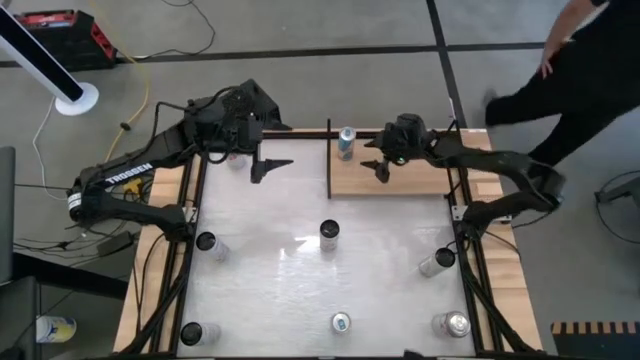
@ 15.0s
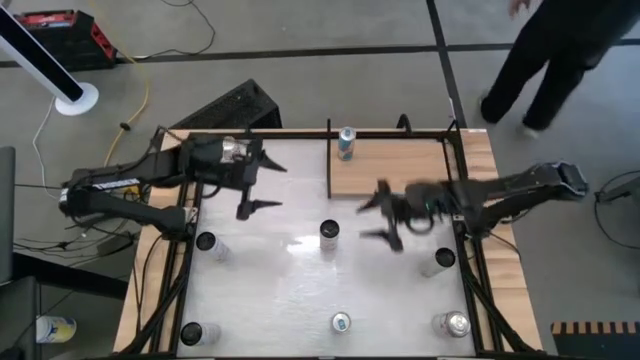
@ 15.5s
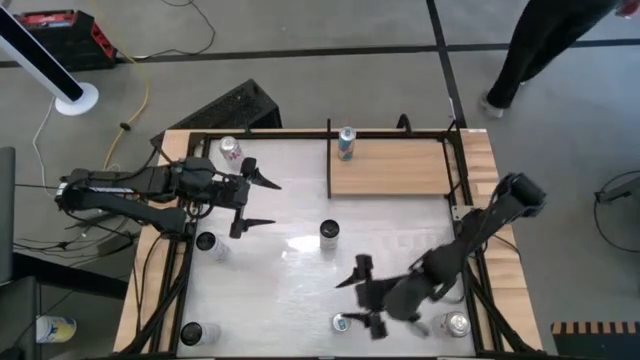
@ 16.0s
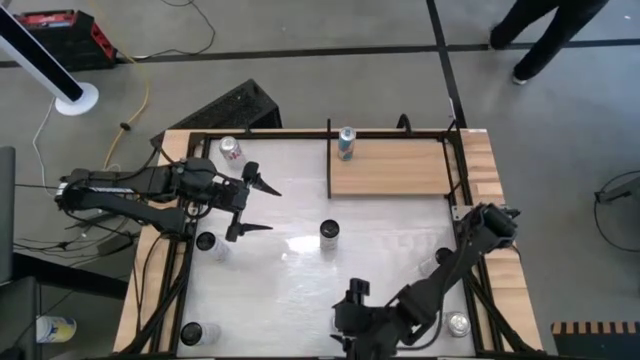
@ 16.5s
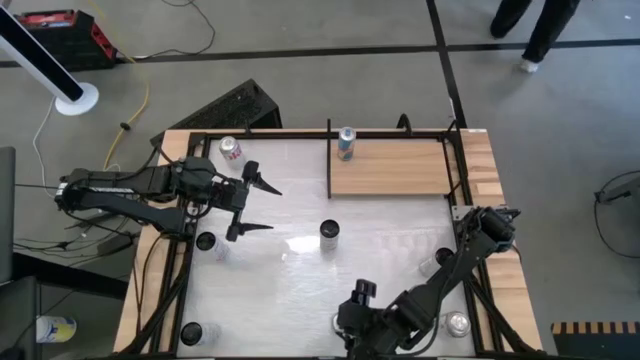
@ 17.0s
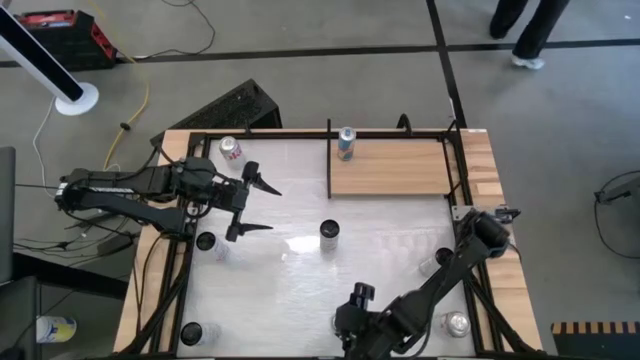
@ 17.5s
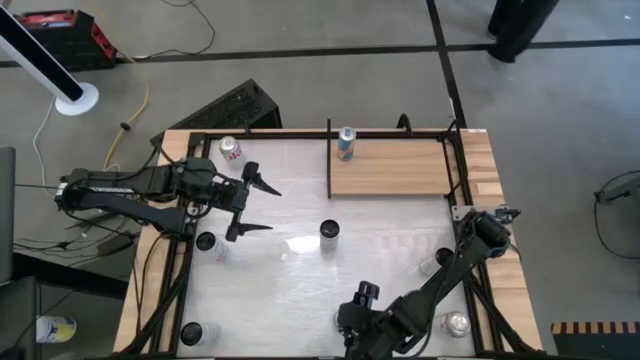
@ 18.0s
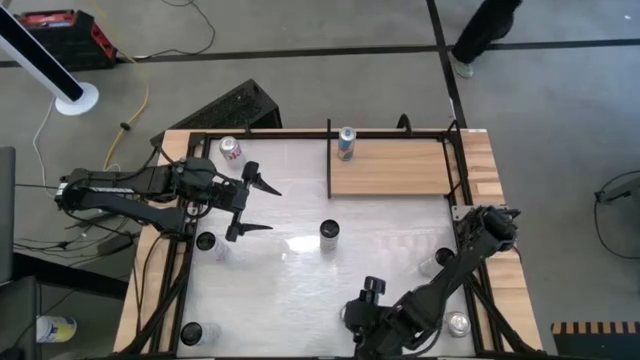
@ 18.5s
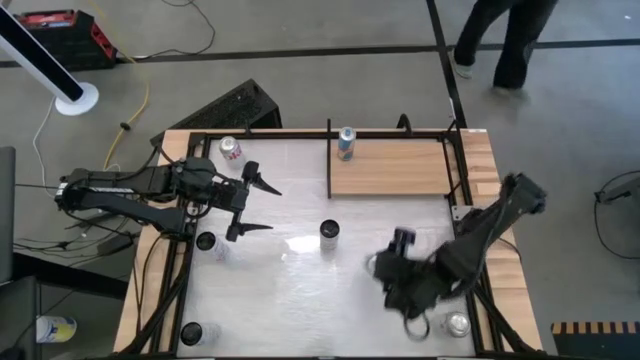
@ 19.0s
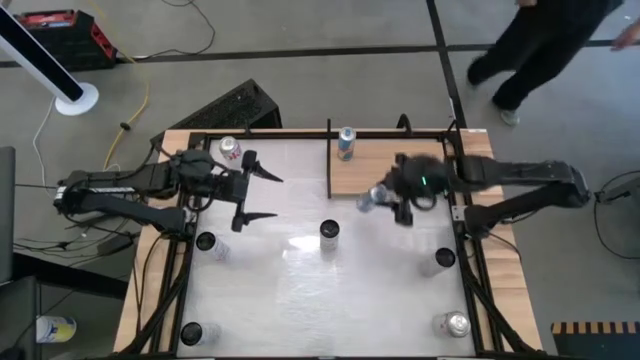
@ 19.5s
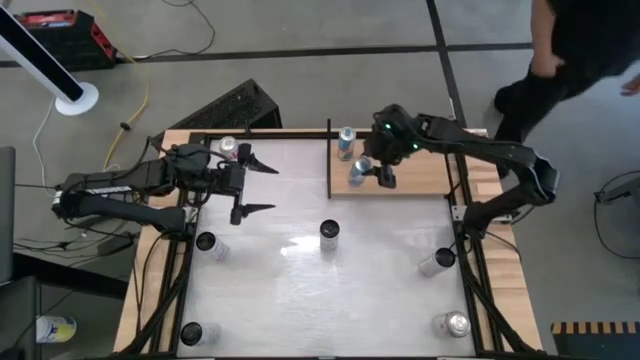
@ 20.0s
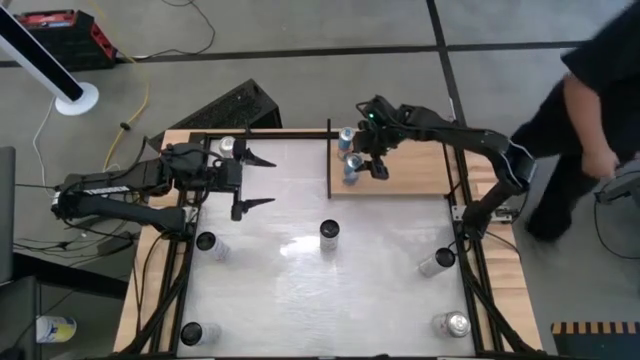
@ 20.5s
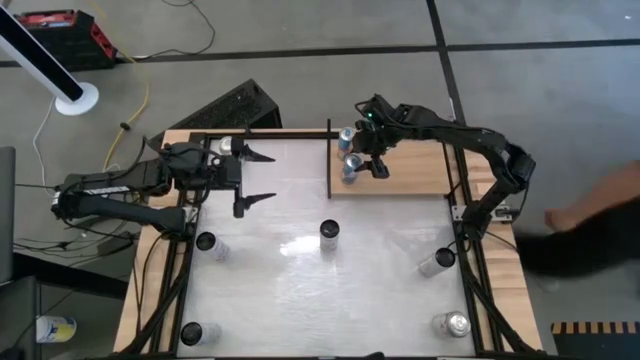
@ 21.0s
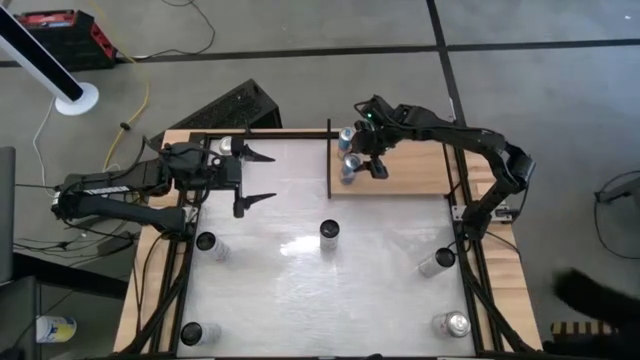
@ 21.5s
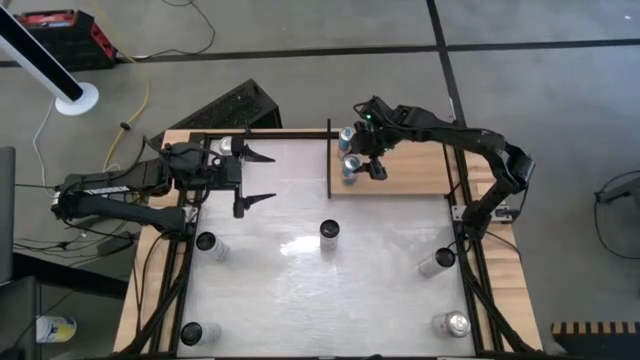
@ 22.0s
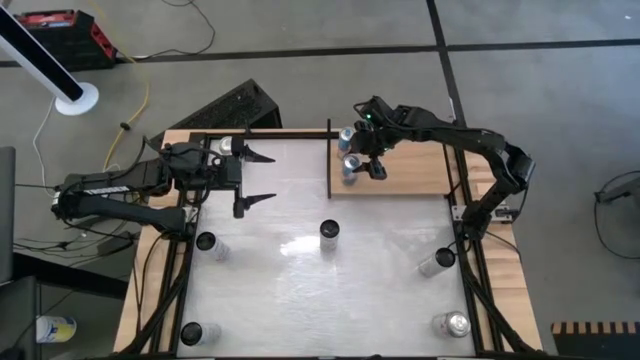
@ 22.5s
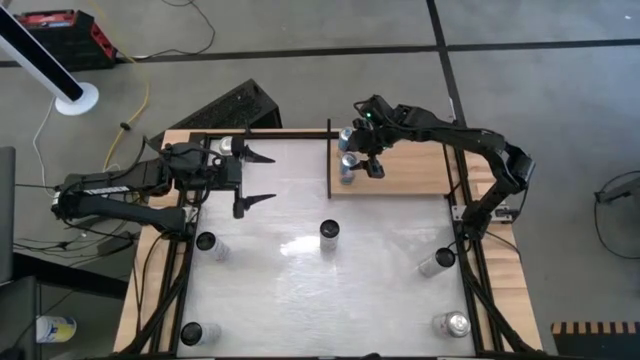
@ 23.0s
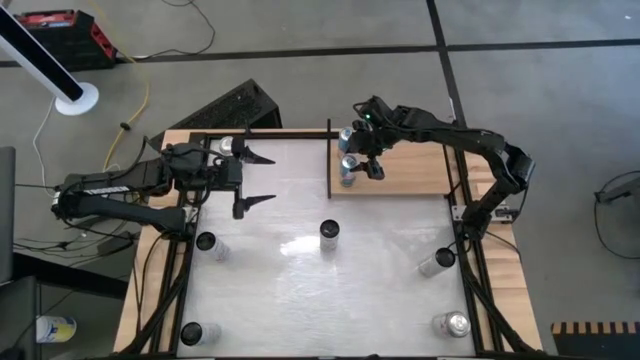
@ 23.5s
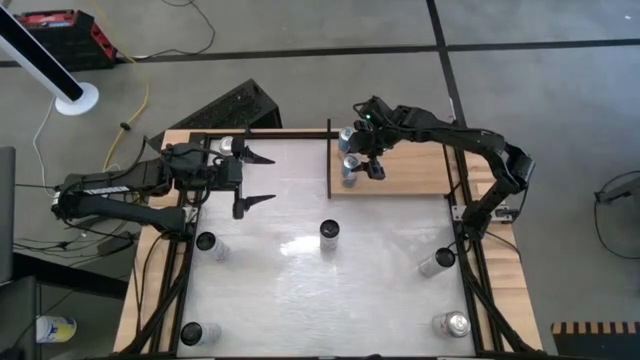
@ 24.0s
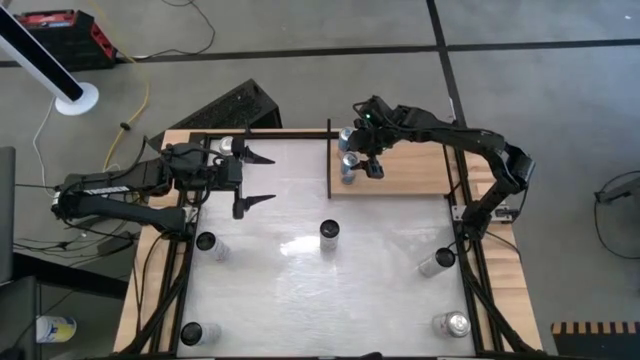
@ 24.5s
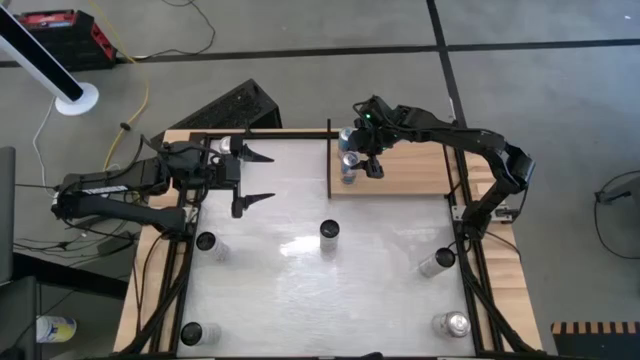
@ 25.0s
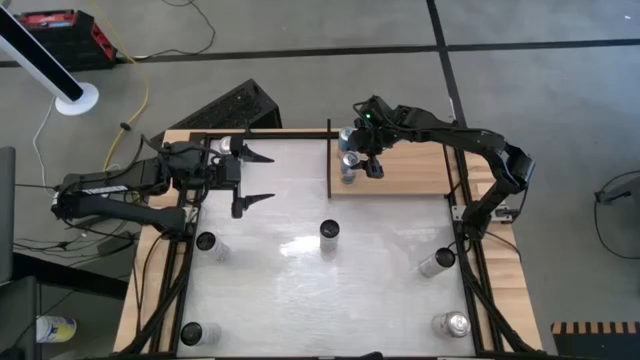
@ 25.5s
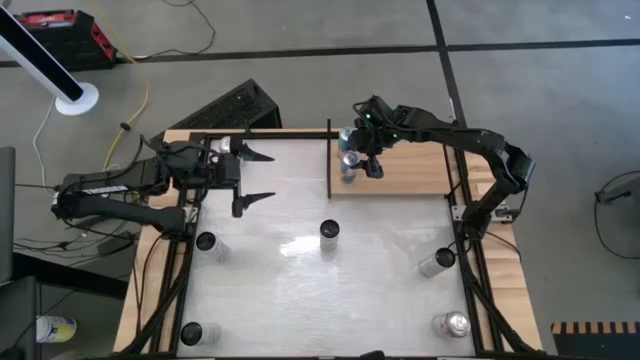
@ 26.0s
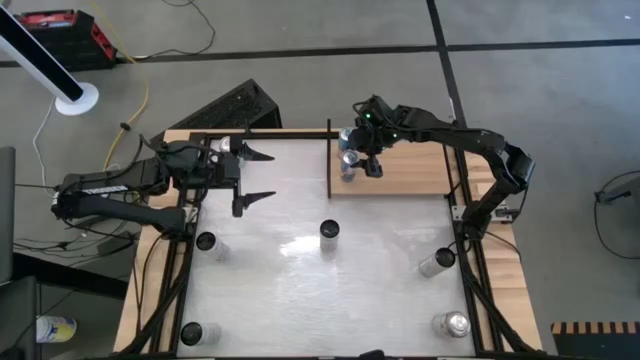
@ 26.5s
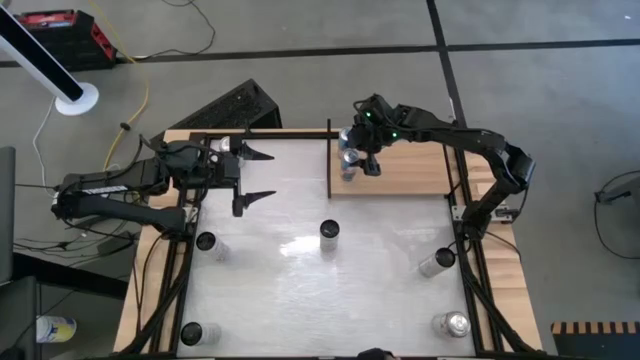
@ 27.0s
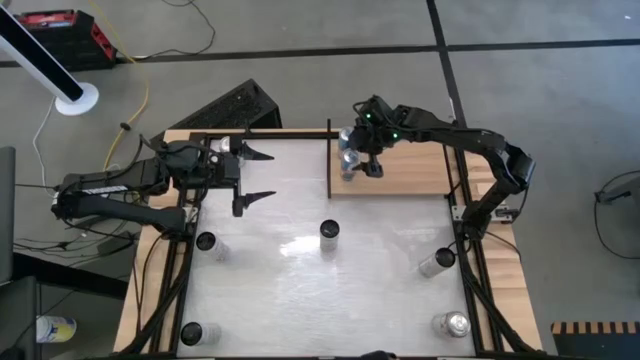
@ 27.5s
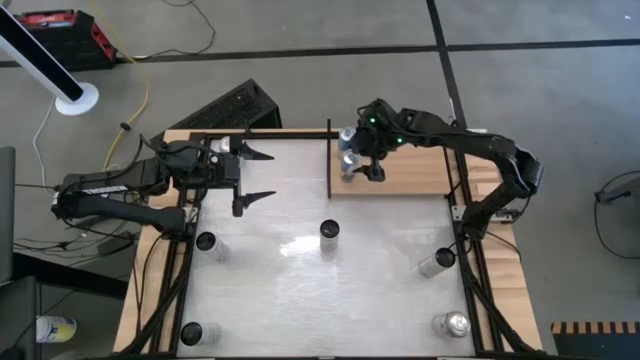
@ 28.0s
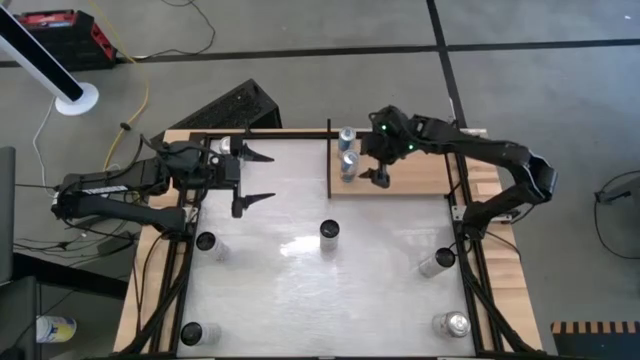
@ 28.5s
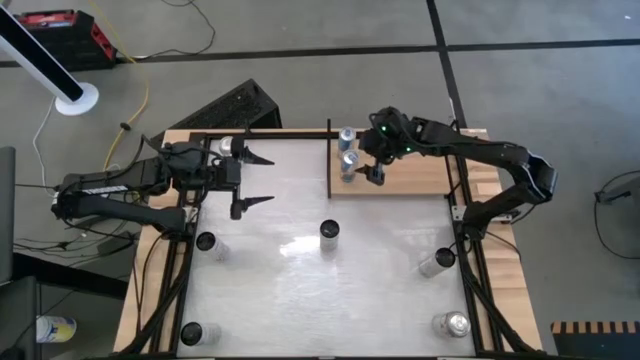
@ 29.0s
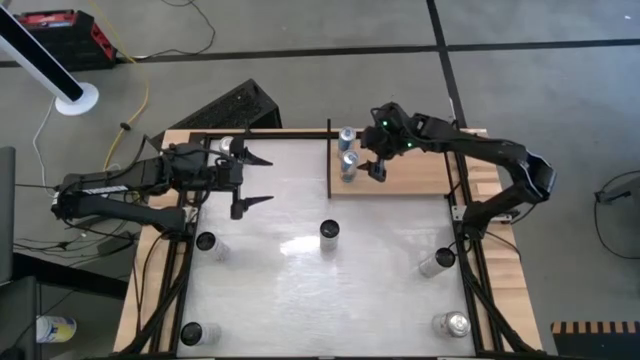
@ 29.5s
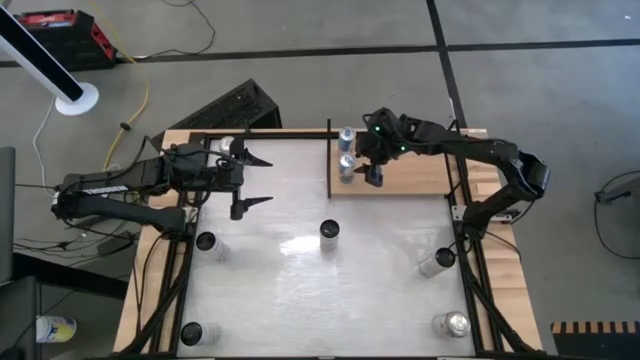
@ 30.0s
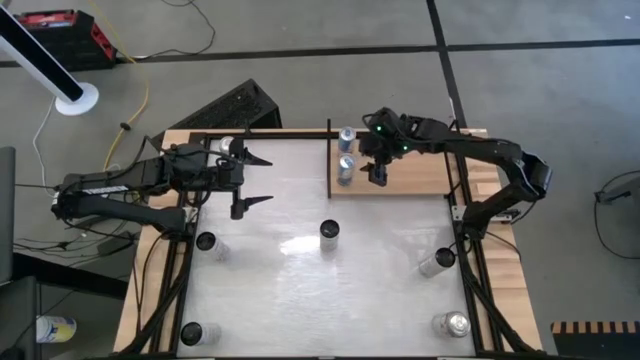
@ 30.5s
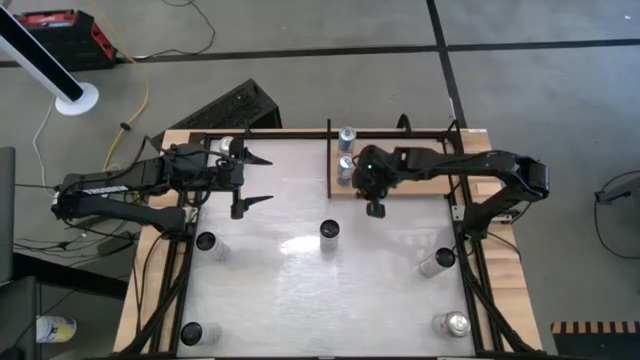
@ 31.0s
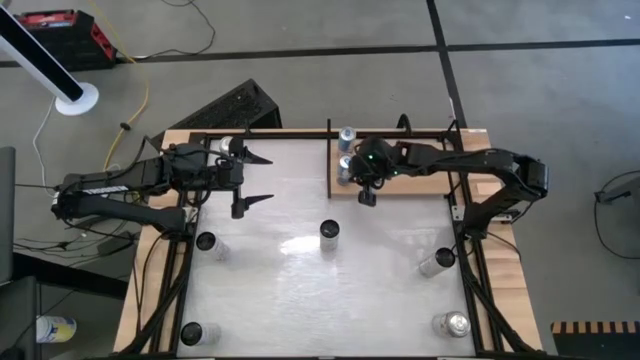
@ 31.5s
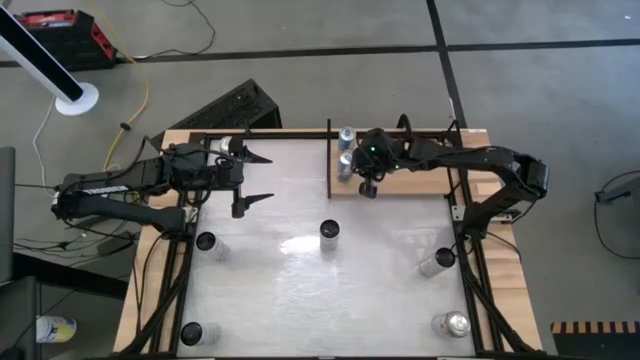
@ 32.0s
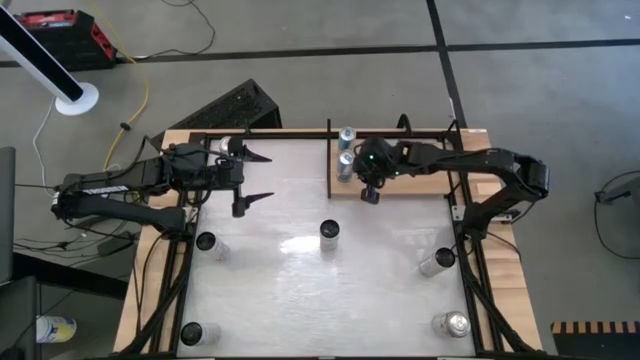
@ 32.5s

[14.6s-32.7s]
Task: Place canned beverage on shelf
Put the blue soda can on the shelf aligned with the other blue soda can

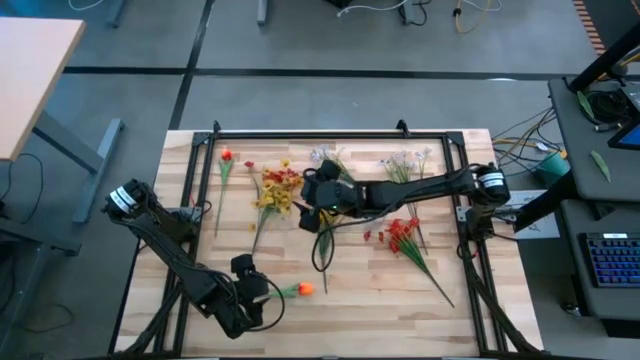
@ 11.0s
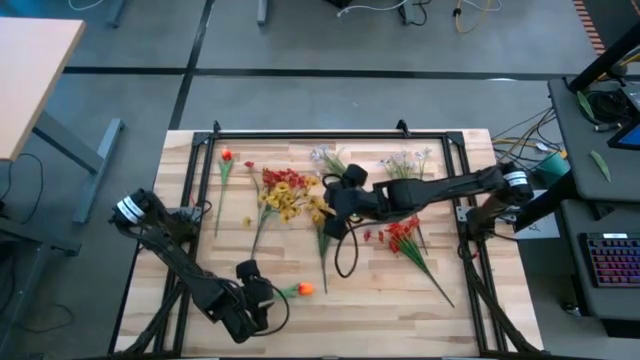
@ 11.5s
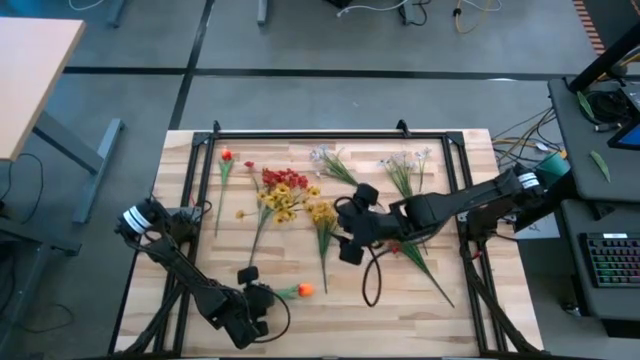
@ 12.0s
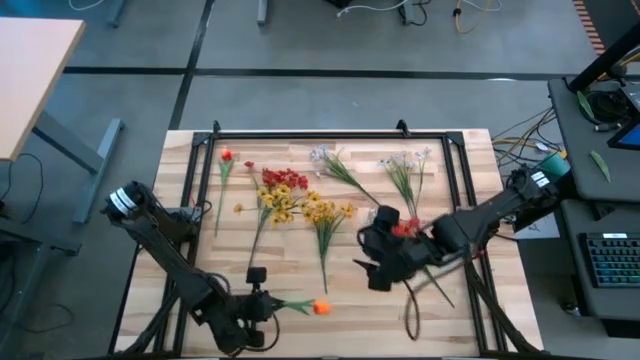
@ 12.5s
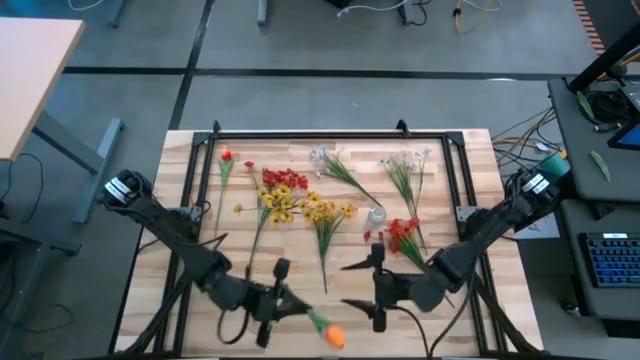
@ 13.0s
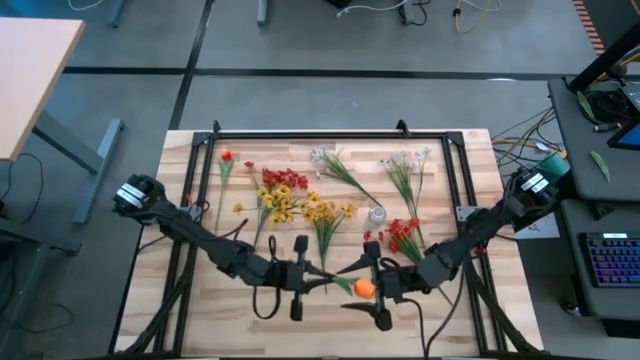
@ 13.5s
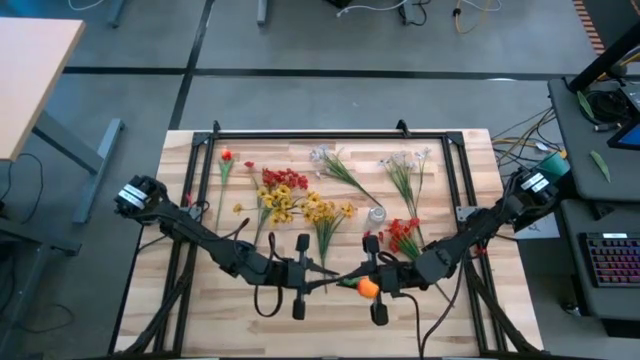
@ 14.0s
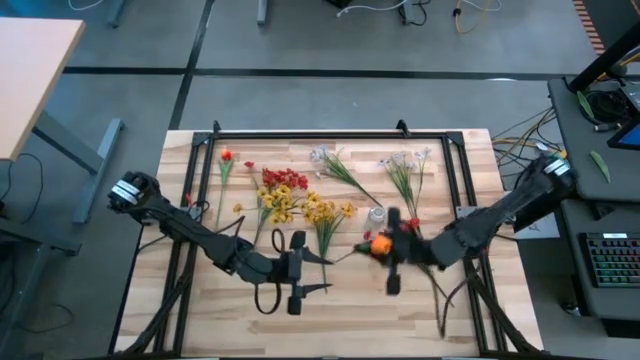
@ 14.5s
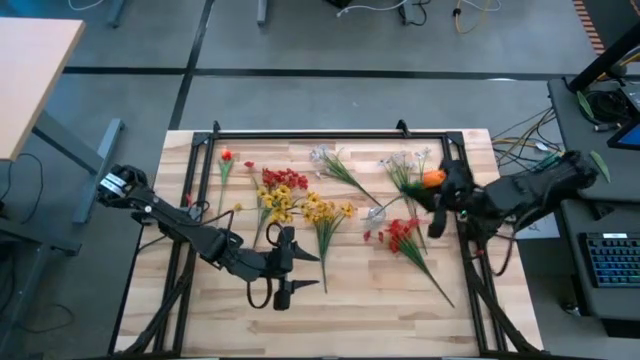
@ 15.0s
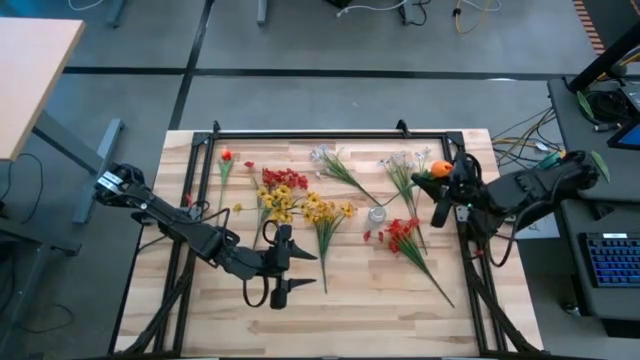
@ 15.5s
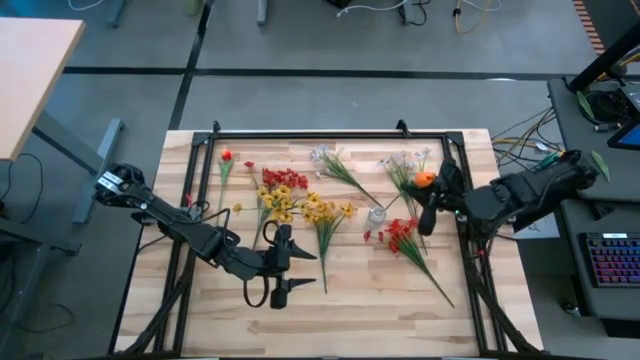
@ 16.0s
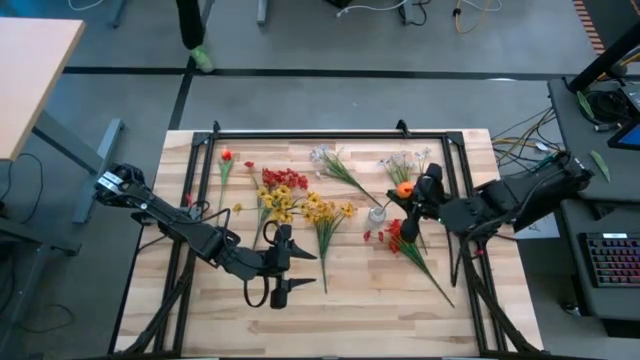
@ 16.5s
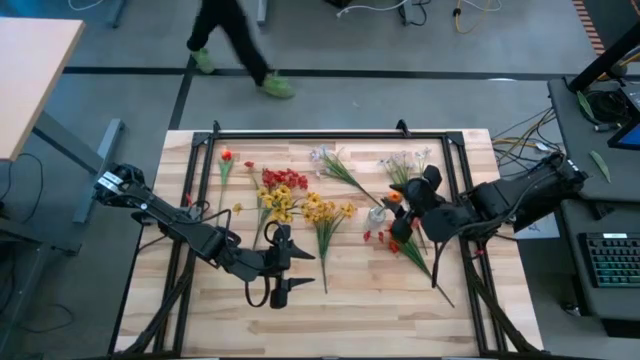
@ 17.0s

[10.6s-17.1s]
Task: Sort flowers into vase by color
Put the bottom orange flower into the right transparent vase
